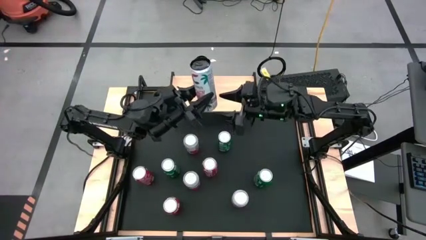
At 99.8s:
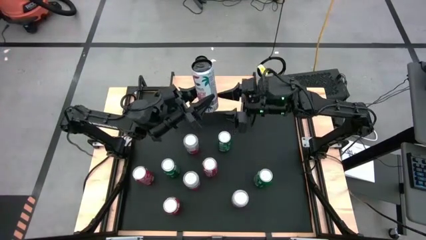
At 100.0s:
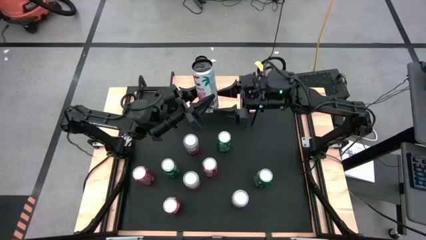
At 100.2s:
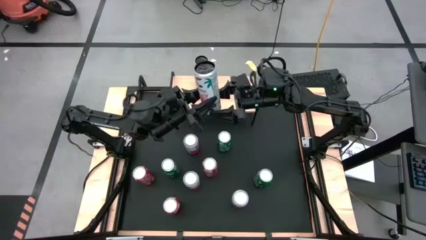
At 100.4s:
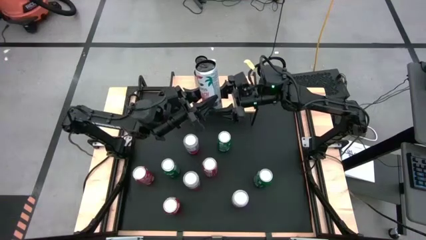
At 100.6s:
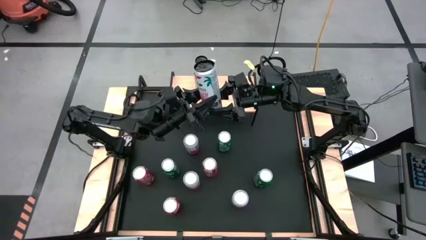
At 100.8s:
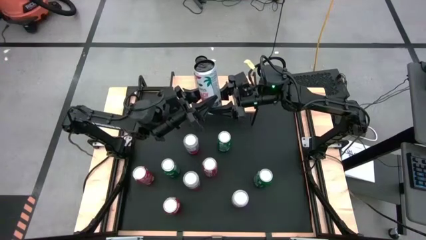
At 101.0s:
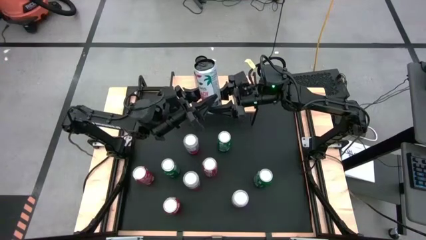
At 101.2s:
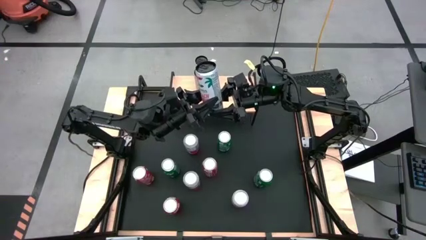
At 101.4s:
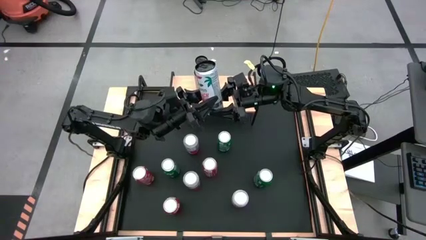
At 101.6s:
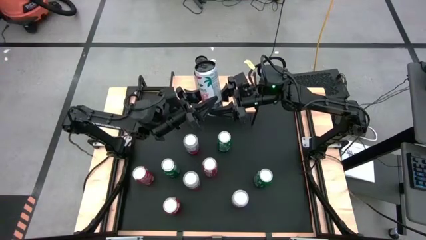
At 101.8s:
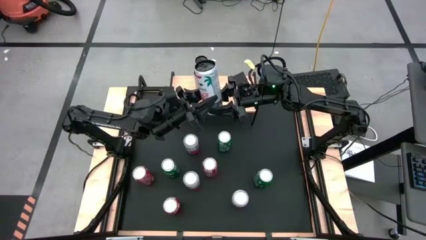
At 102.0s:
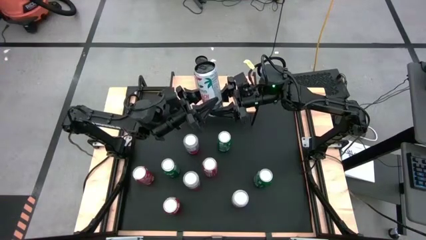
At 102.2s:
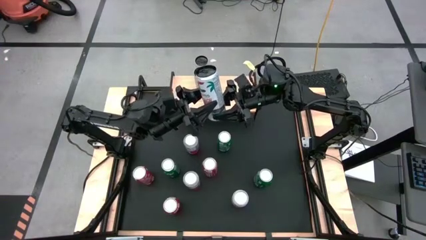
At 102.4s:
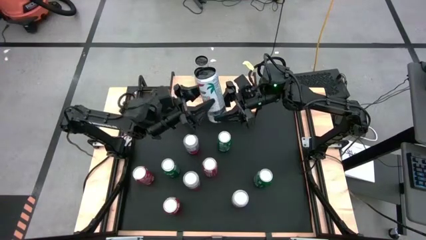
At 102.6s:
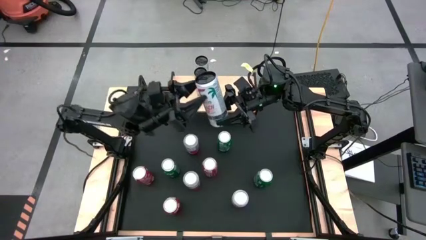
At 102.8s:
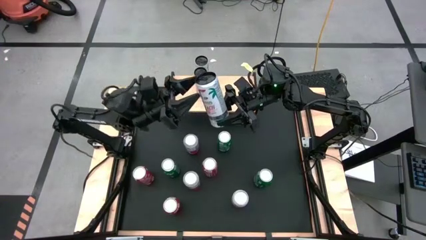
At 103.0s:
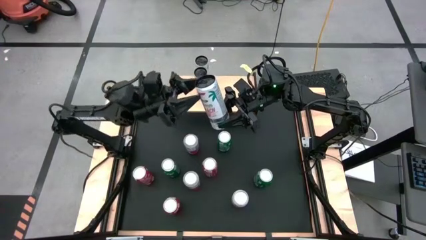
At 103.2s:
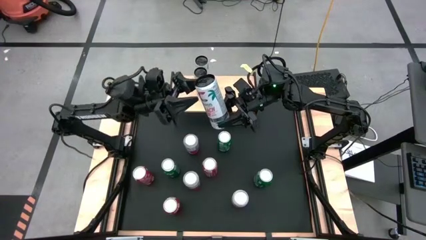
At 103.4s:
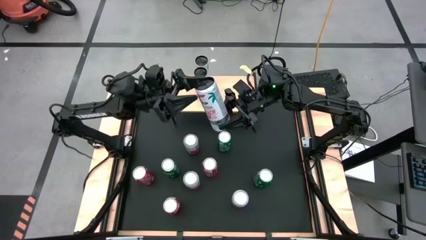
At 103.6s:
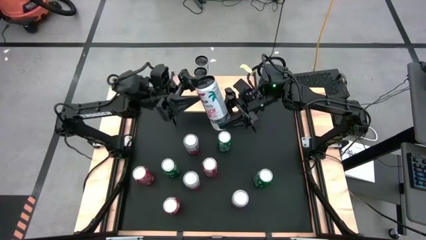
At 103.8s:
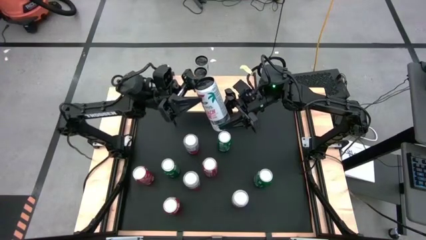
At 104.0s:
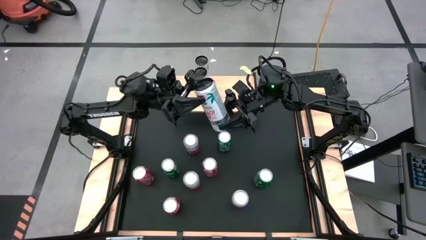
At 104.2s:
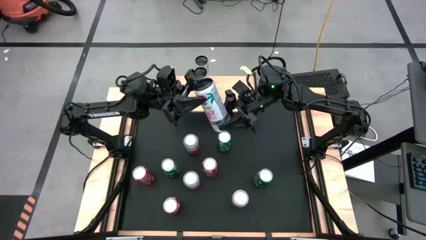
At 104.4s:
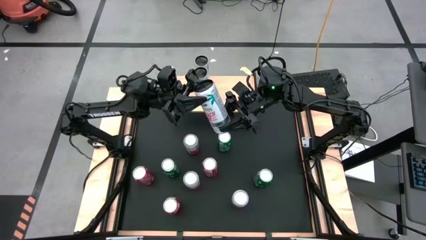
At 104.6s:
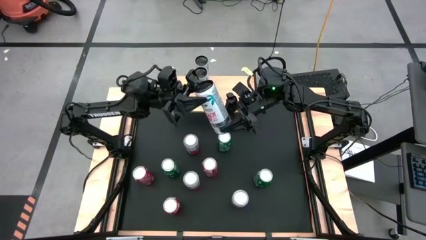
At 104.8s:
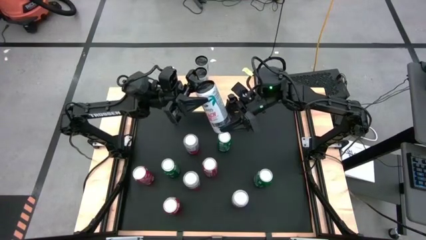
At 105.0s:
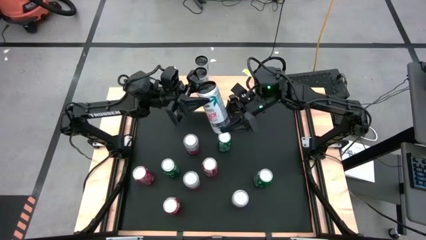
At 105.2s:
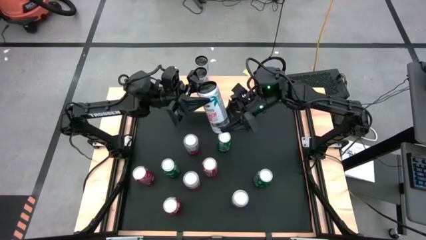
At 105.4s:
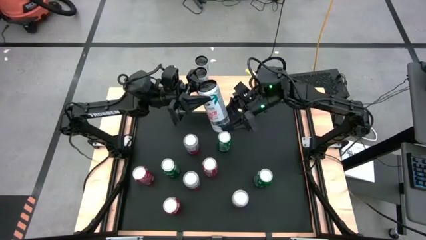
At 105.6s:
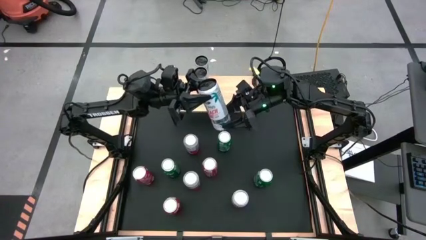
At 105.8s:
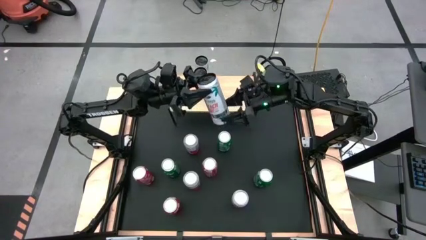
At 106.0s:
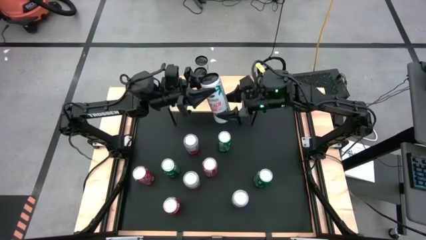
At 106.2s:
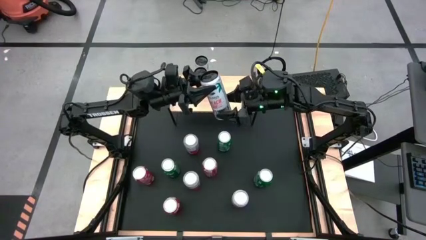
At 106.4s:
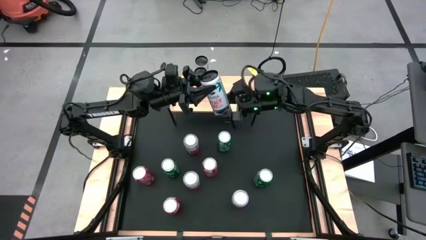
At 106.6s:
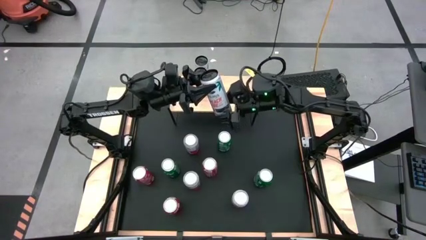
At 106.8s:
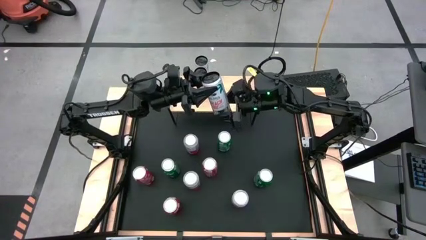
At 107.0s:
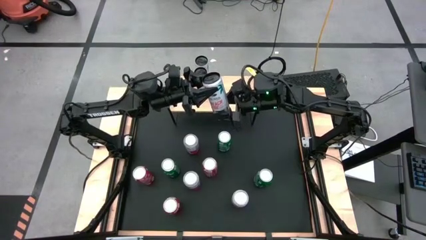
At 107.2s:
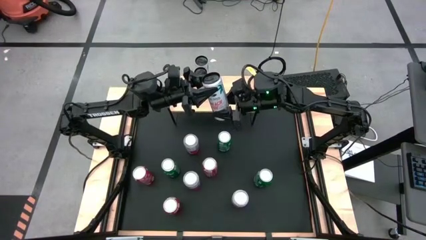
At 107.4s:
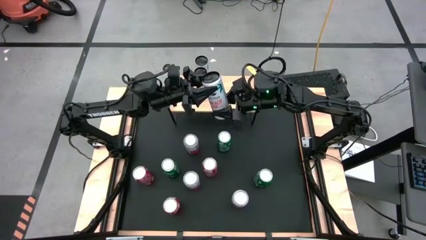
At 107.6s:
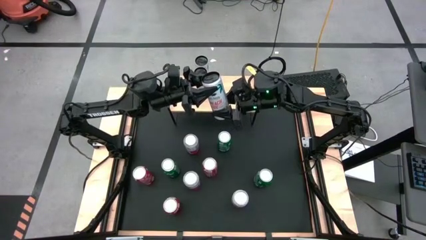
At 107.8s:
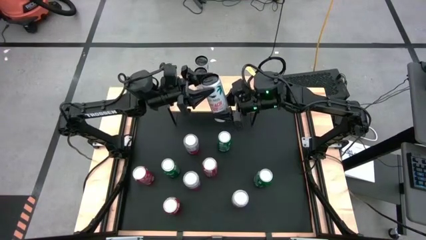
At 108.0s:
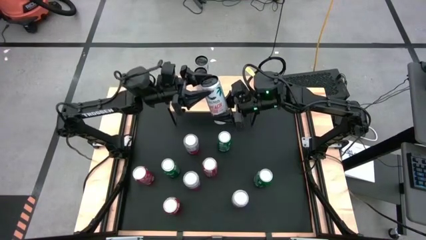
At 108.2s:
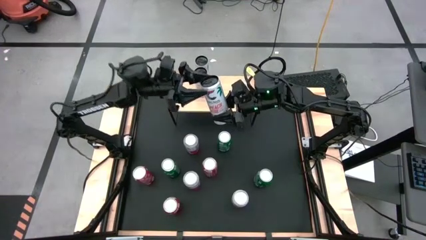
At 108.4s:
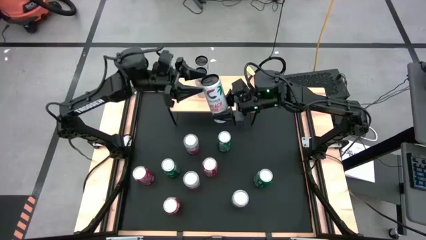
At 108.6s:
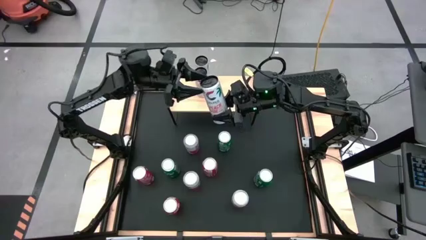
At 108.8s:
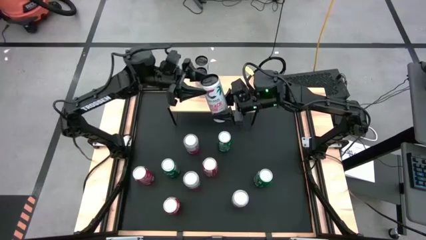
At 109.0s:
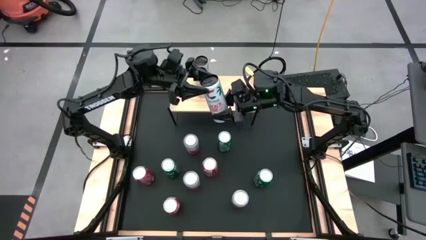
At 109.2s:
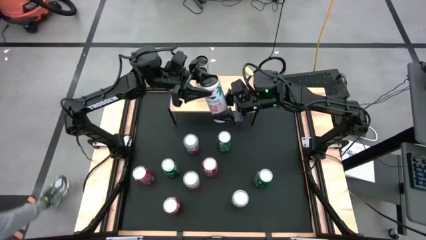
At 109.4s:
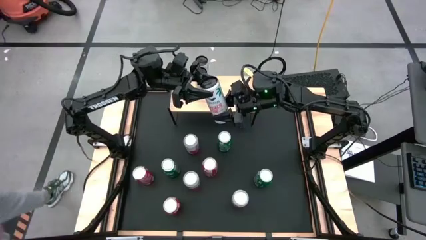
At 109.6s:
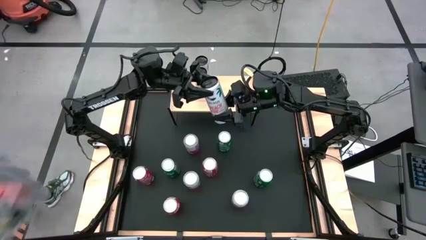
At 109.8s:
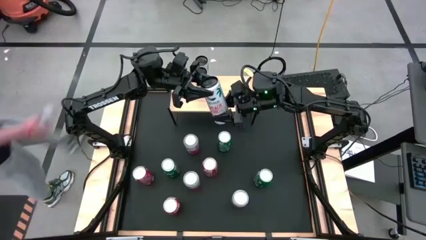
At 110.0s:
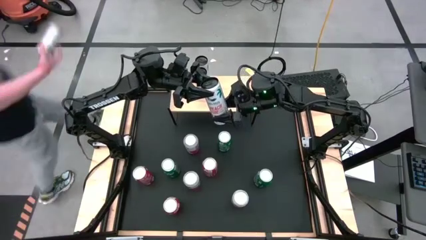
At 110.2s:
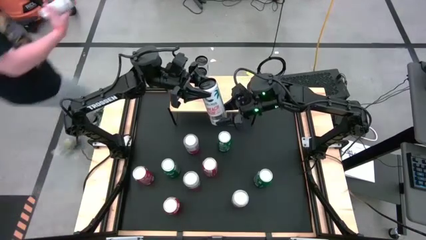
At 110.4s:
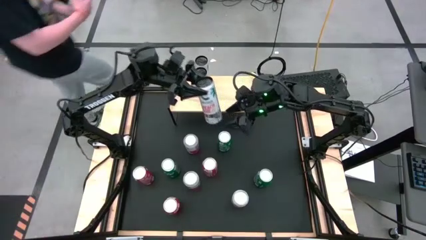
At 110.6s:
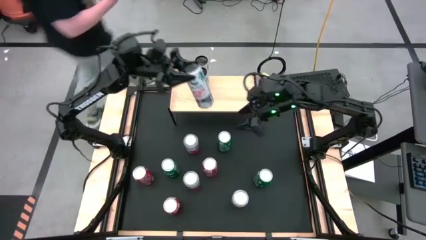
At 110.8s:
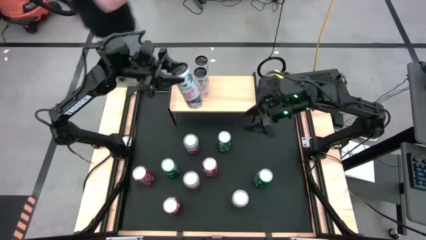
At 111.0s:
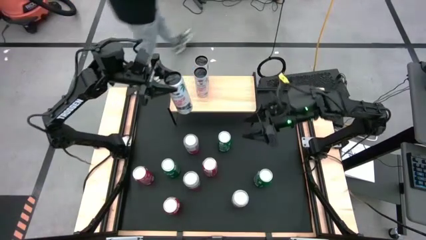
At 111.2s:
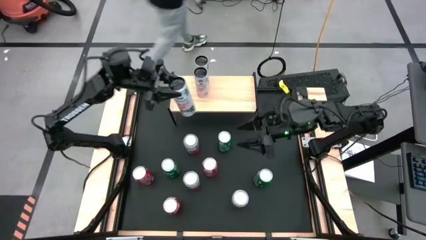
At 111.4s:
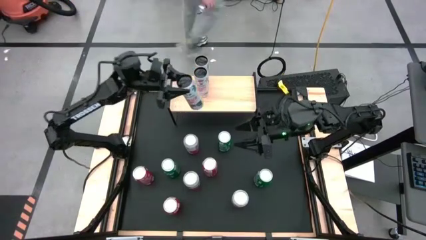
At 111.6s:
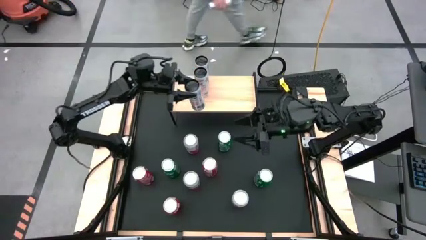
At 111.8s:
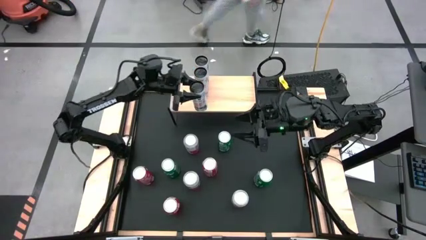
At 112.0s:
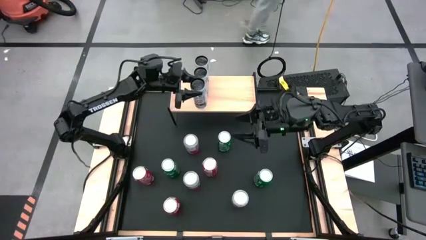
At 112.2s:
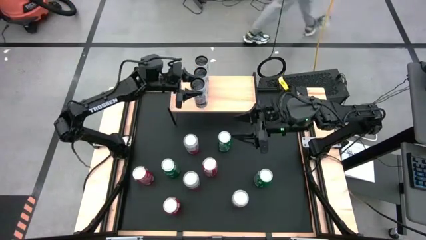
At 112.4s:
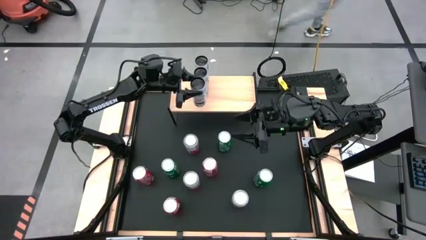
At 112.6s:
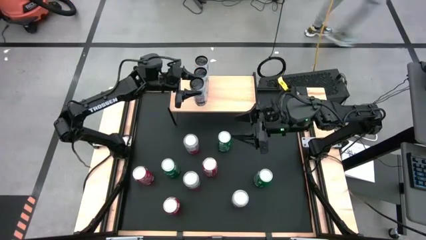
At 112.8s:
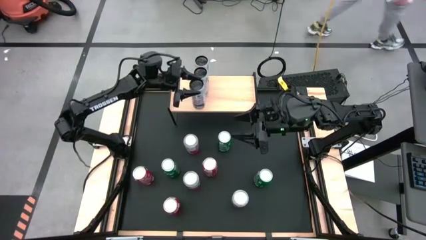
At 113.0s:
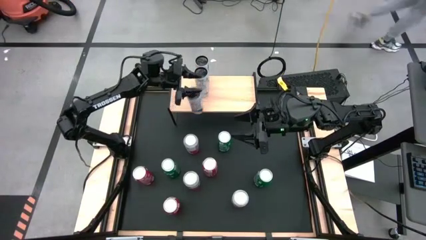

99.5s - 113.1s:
Task: Place canned beverage on shelf
Put the white pink soda can aligned with the other white pink soda can on the shelf
